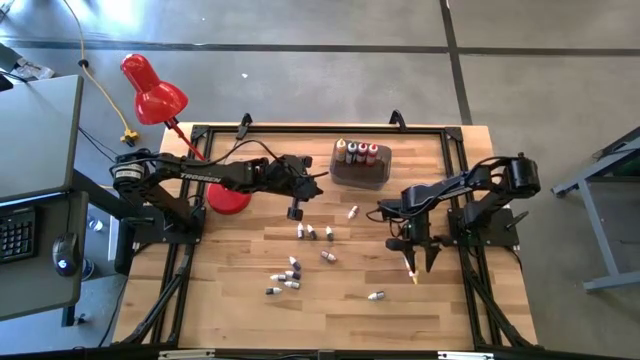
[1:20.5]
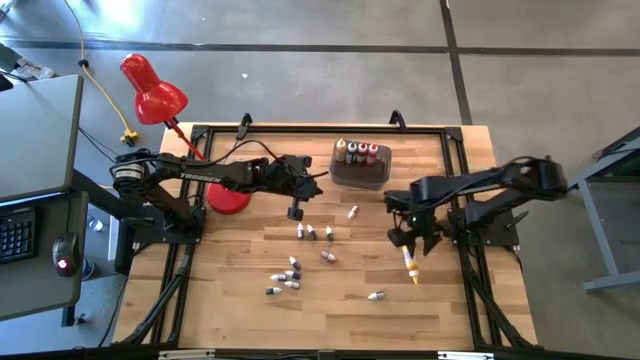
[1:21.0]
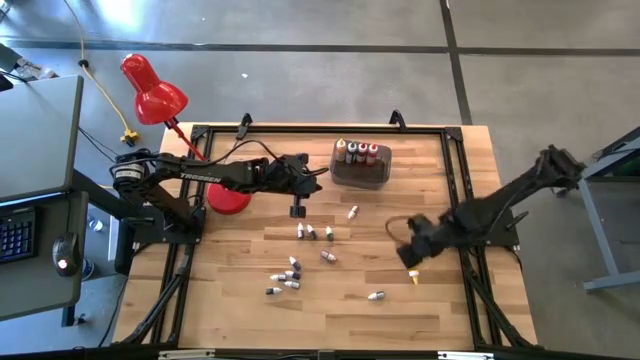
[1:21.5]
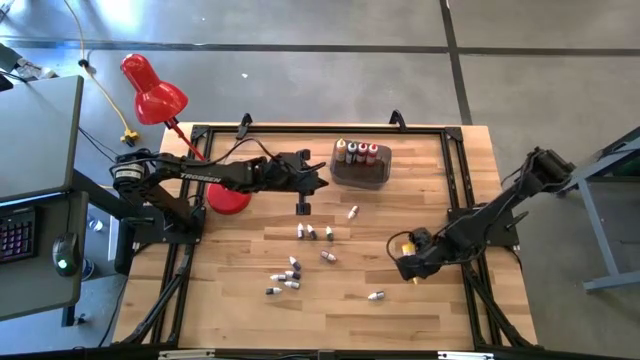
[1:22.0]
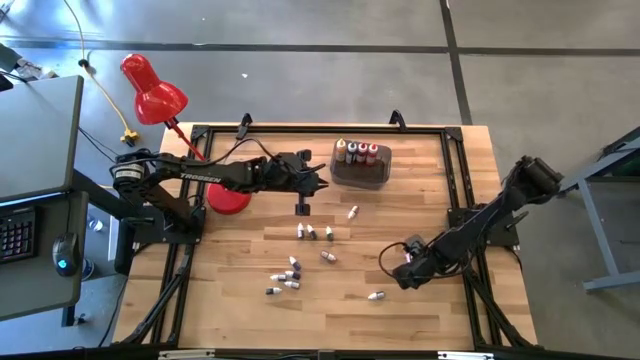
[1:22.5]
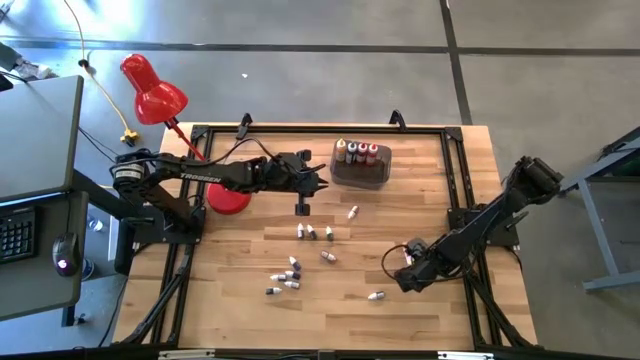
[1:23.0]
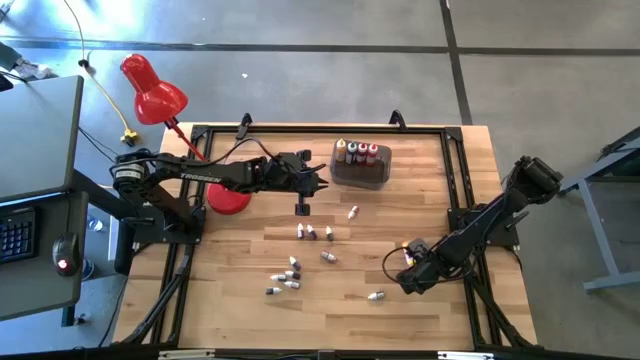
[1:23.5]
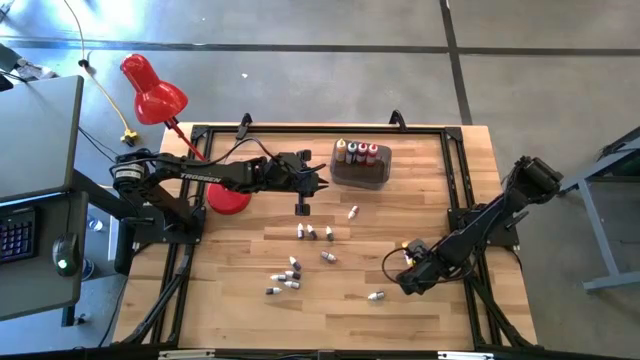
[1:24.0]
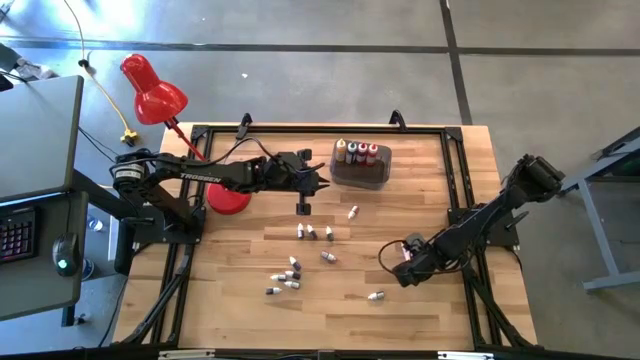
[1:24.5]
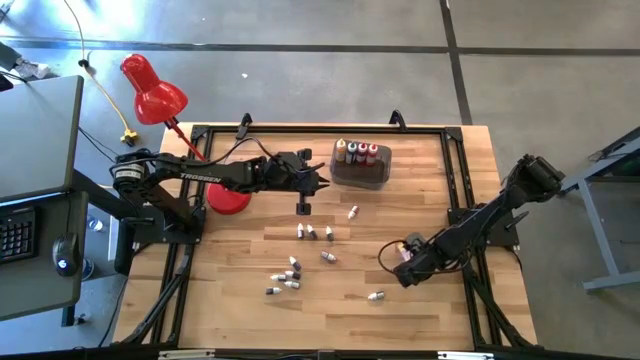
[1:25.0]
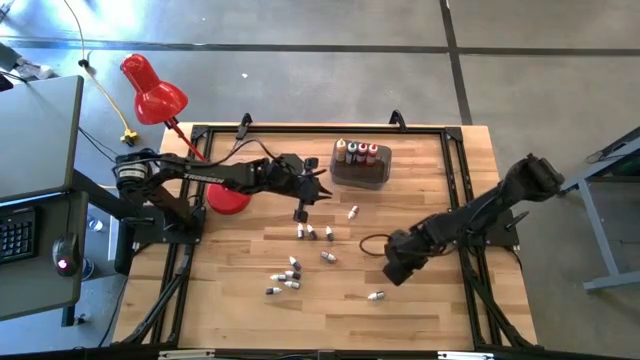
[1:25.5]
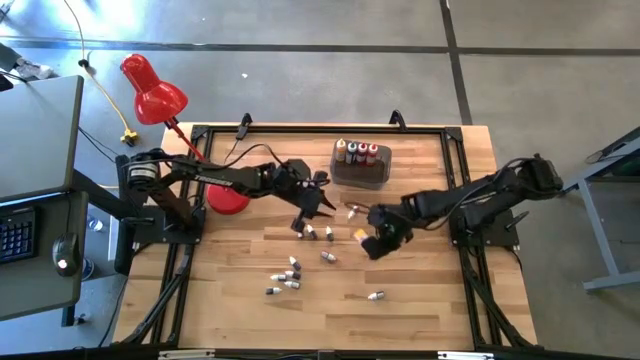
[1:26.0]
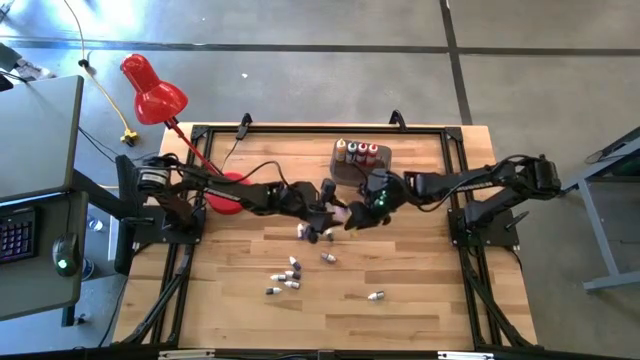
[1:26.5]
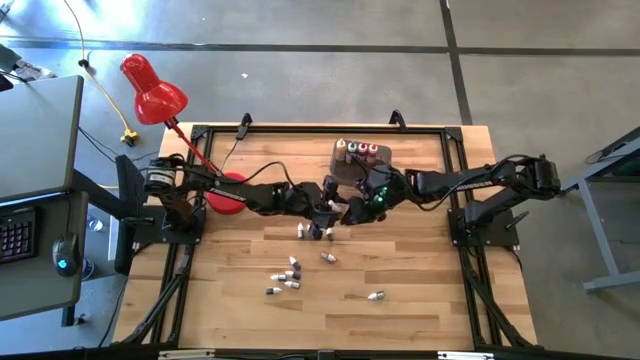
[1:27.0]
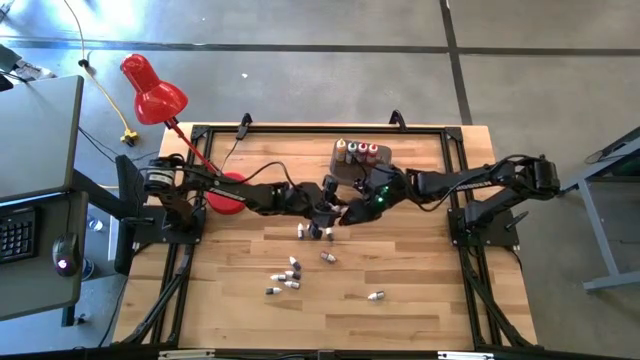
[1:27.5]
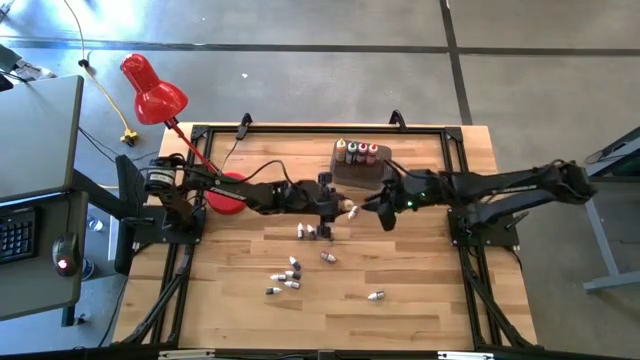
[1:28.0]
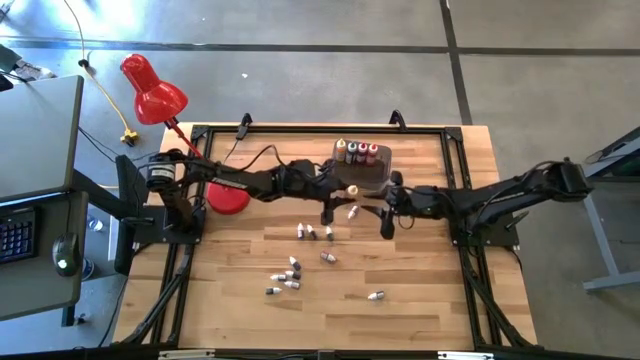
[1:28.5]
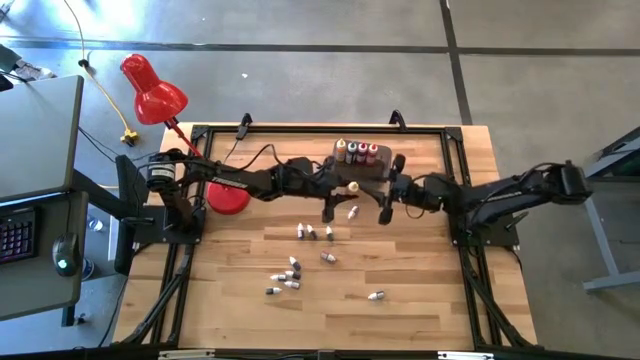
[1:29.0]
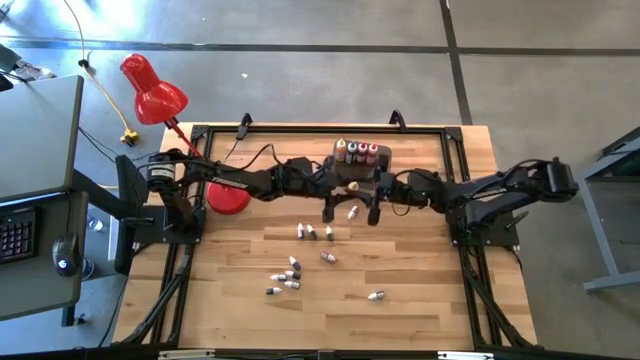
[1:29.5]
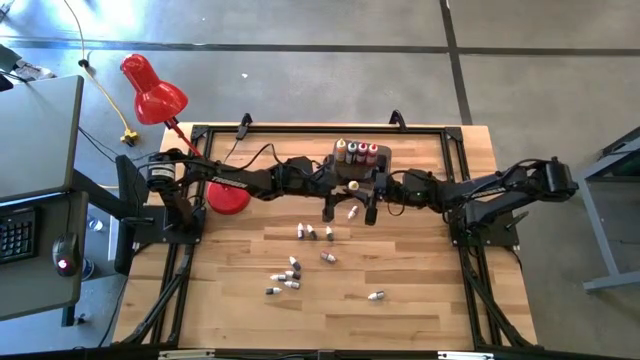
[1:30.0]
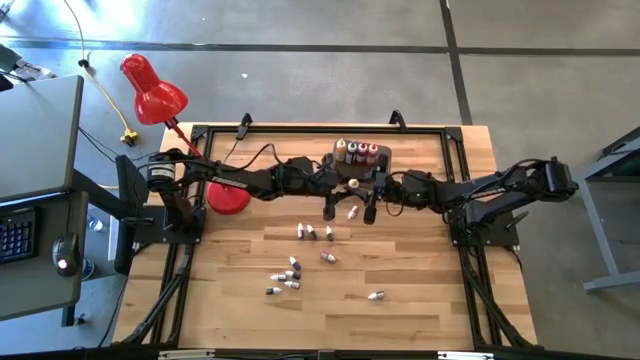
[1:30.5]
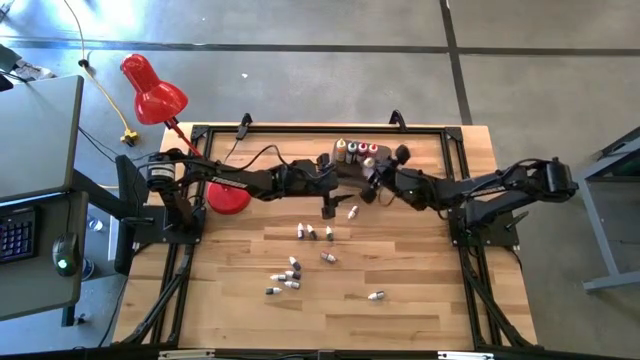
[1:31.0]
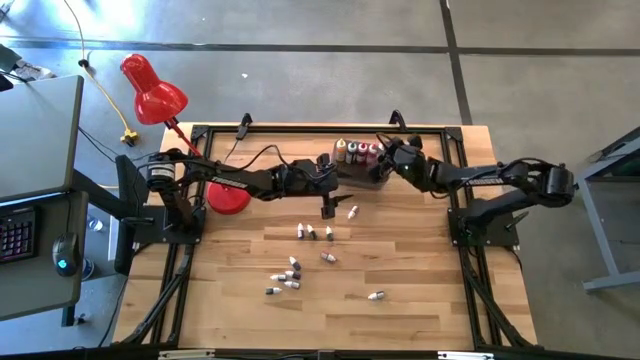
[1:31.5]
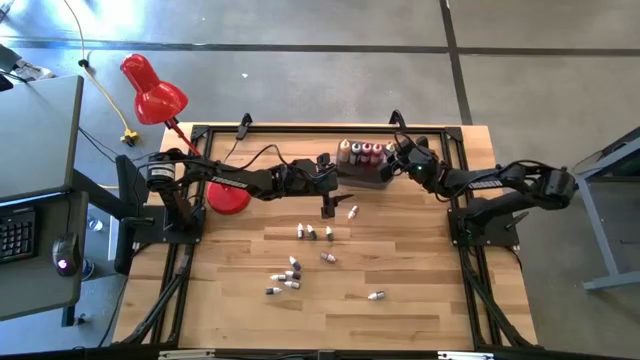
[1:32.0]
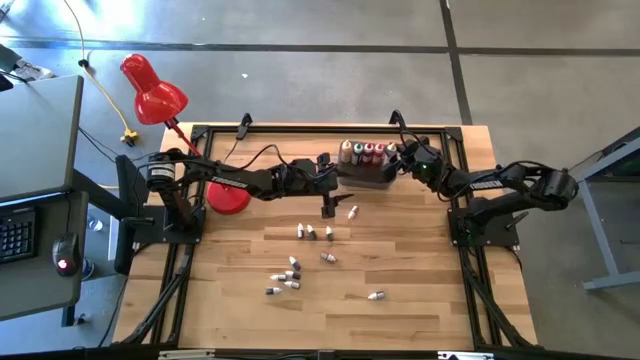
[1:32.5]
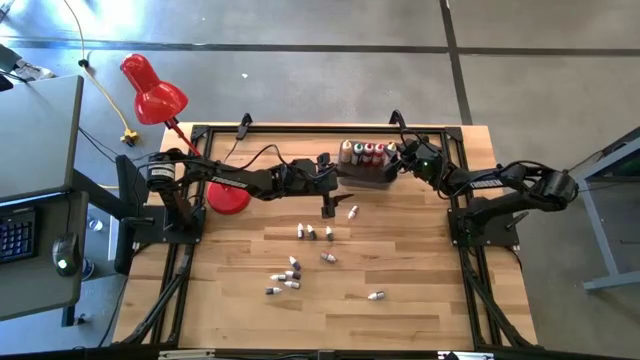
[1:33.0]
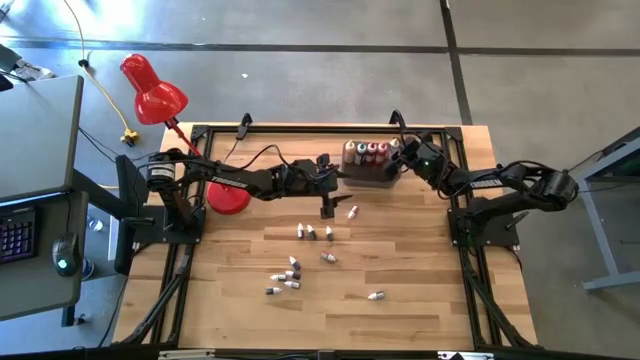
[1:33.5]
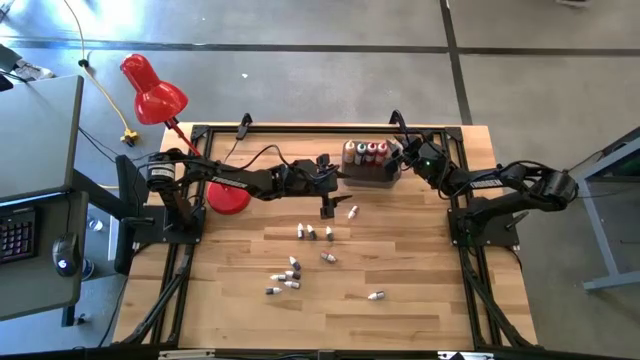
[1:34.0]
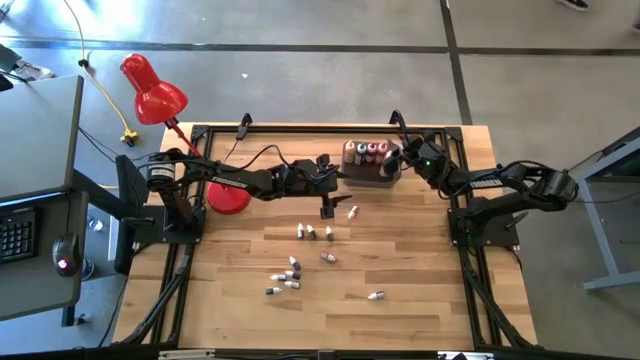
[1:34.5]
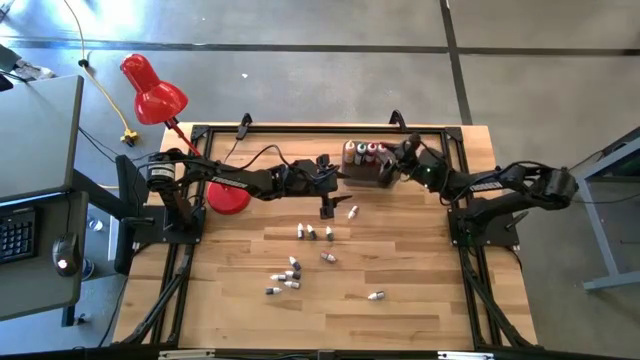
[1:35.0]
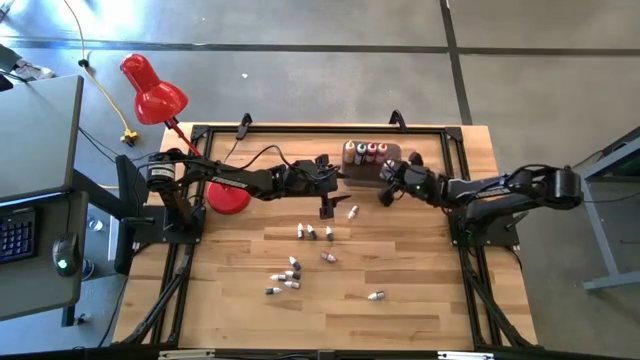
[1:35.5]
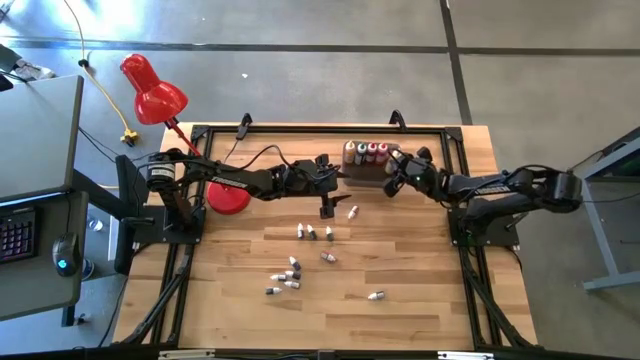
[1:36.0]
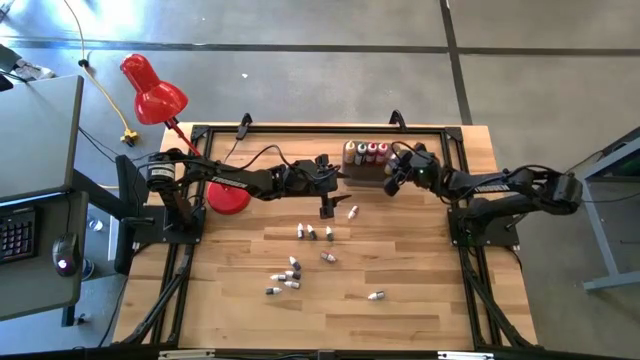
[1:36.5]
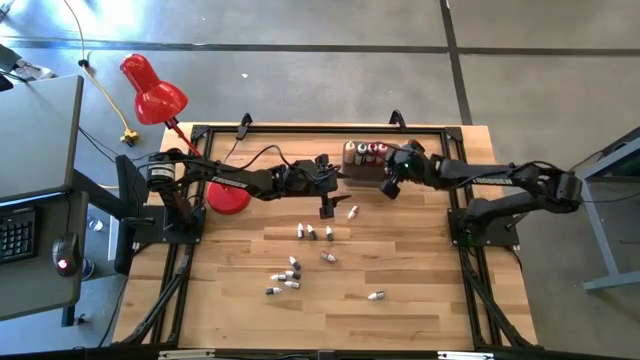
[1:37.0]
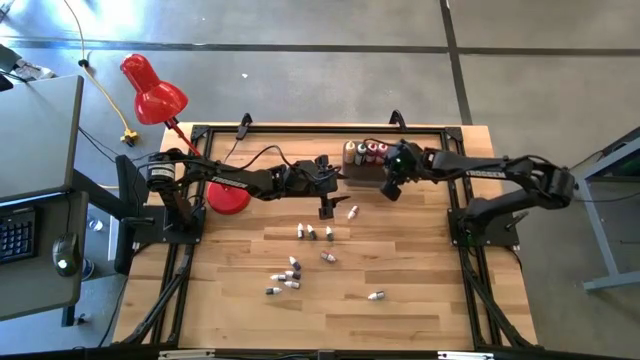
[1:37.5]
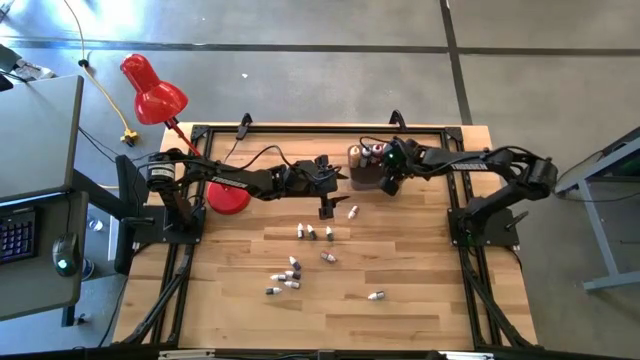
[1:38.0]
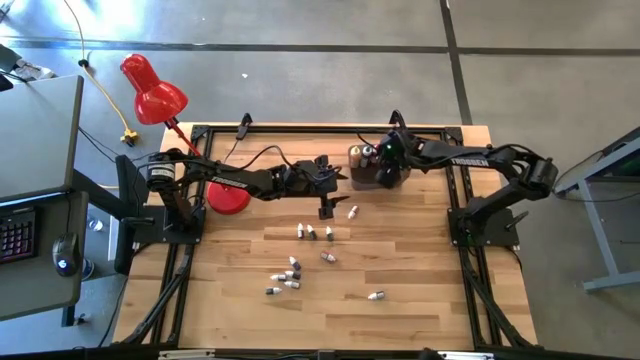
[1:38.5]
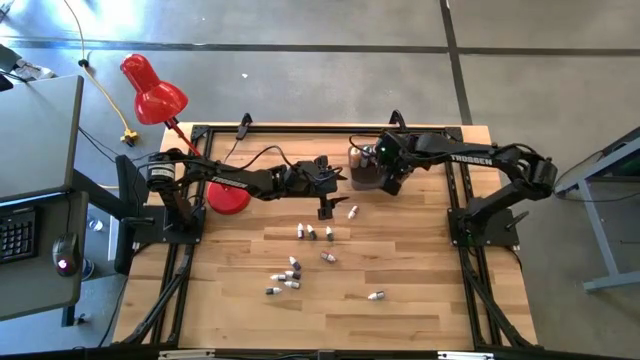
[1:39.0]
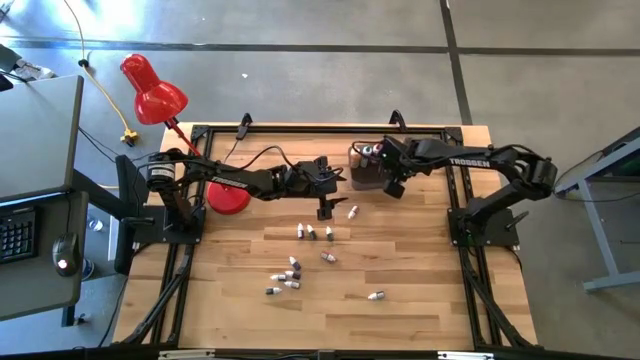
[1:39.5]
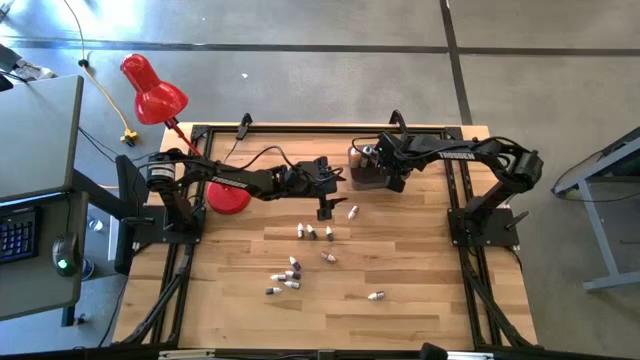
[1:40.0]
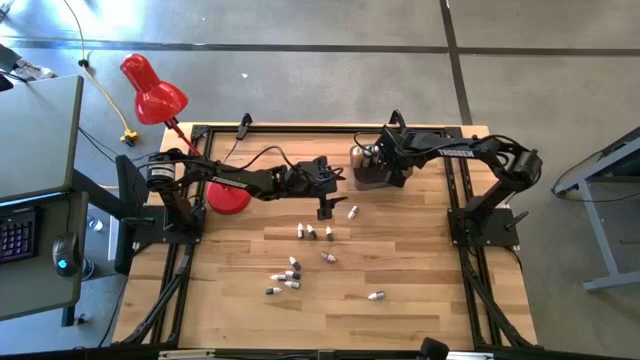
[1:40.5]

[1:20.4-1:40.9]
Task: Pick & Place food coloring
Put the large yellow food coloring bottle into the bin

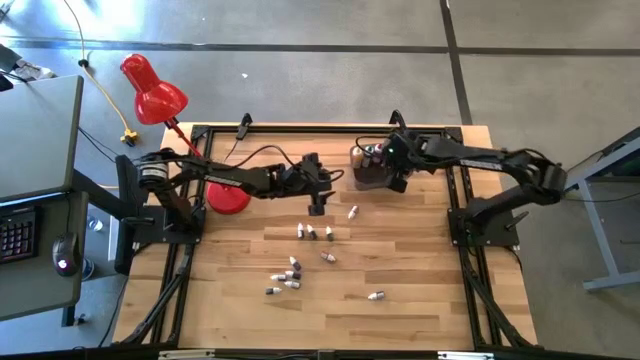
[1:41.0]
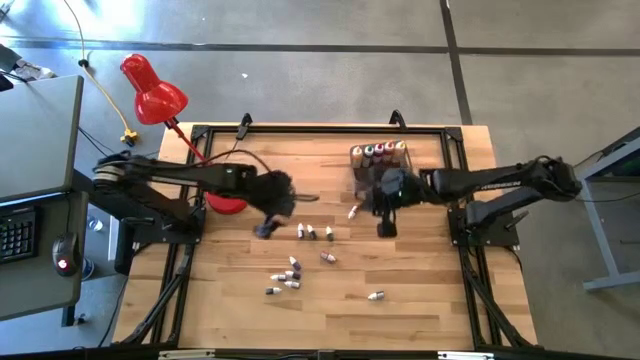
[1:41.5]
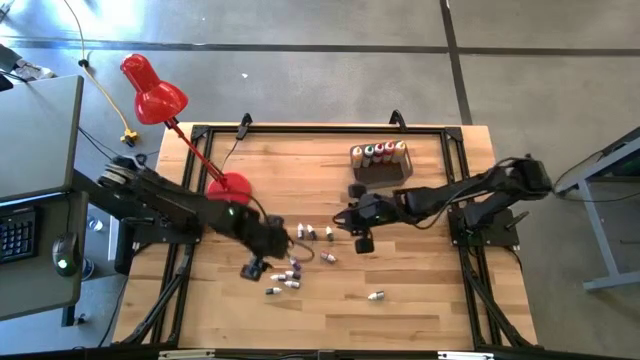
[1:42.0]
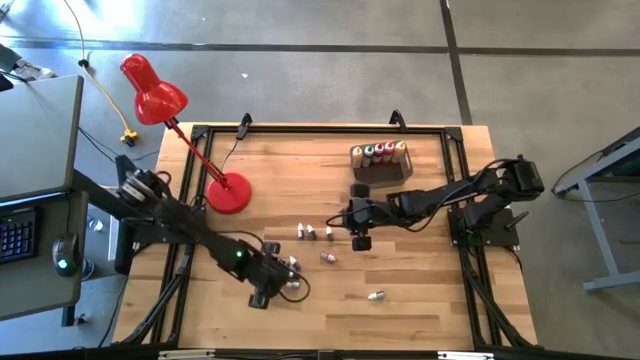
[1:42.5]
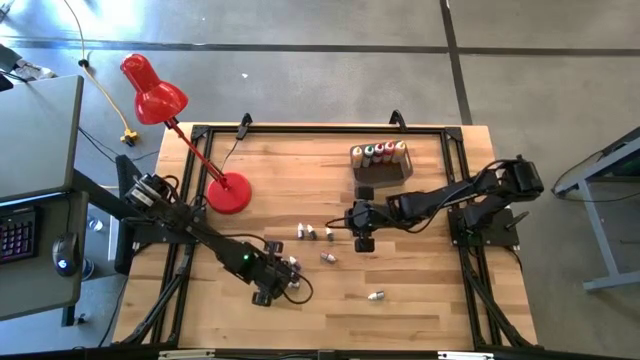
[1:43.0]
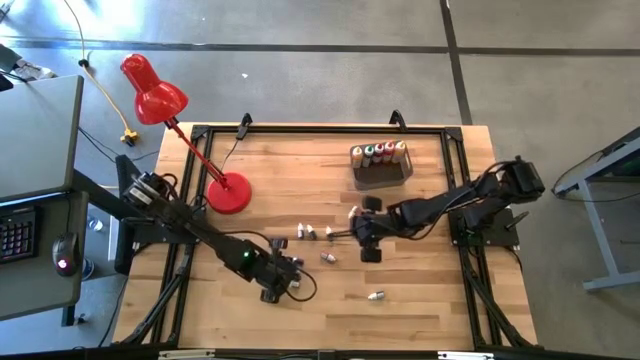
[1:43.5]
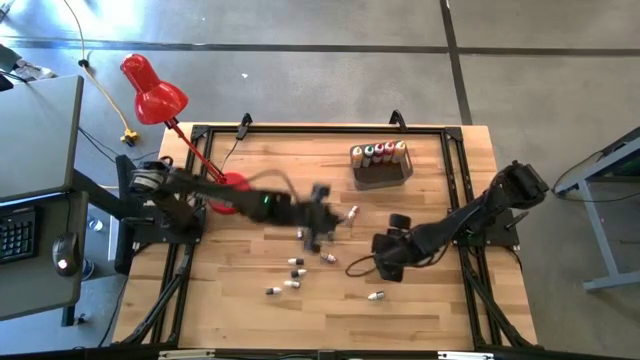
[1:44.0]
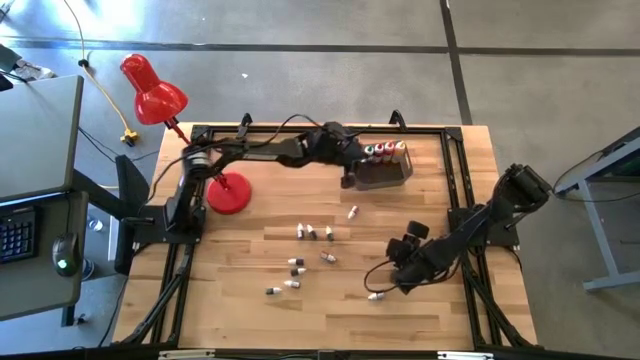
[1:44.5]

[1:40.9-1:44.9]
Put the bottom small blue food coloring bottle into the bin
